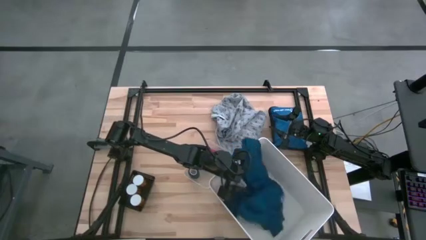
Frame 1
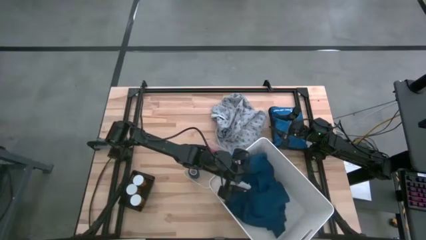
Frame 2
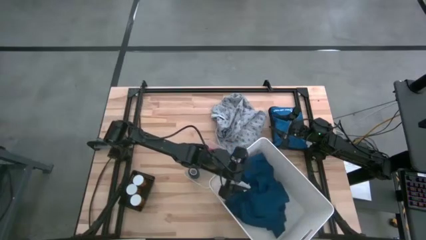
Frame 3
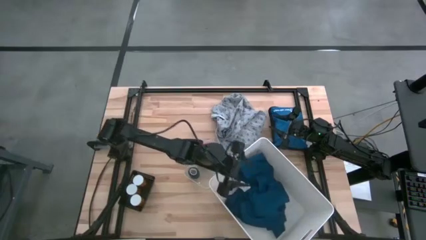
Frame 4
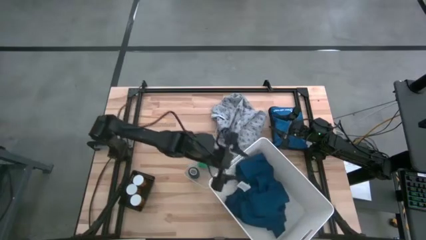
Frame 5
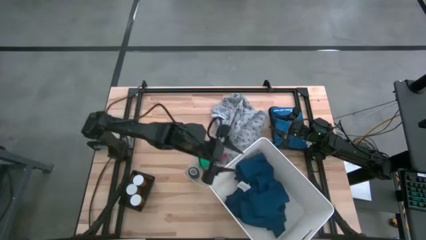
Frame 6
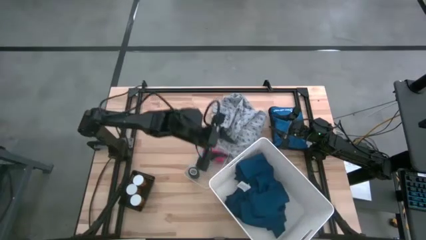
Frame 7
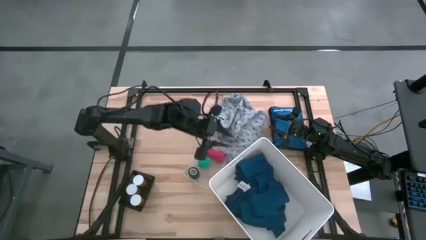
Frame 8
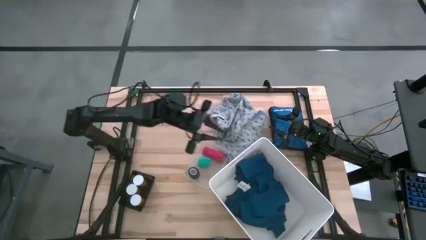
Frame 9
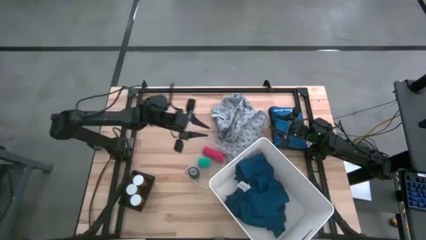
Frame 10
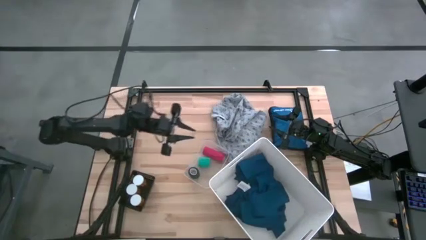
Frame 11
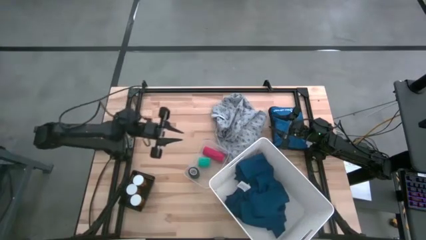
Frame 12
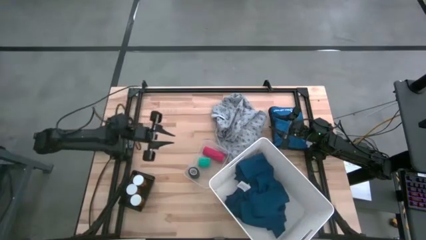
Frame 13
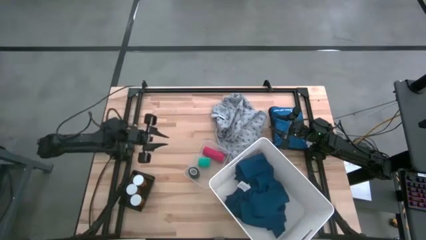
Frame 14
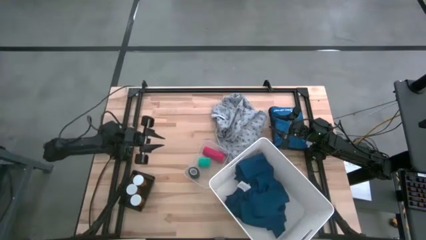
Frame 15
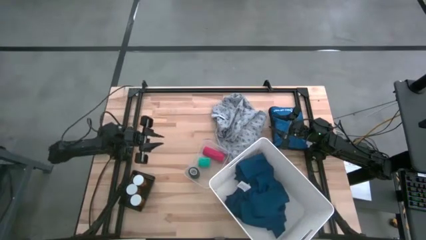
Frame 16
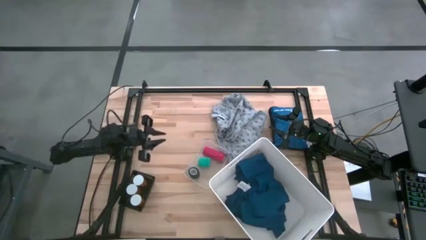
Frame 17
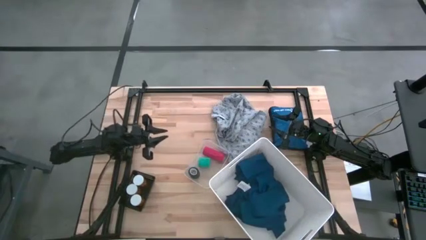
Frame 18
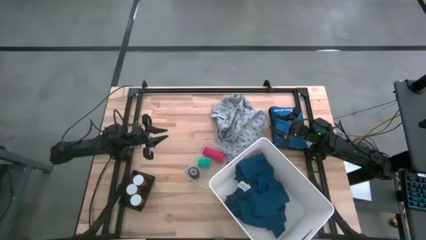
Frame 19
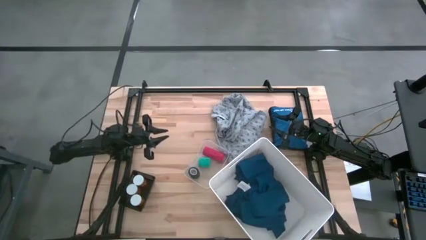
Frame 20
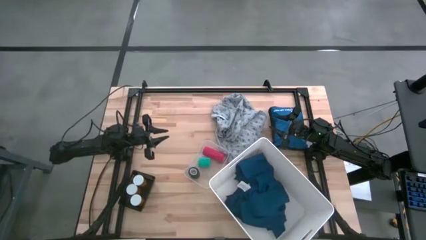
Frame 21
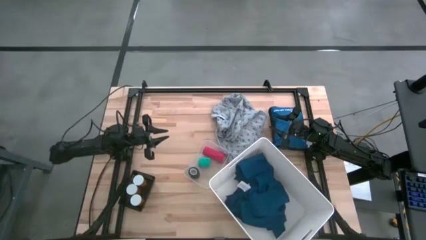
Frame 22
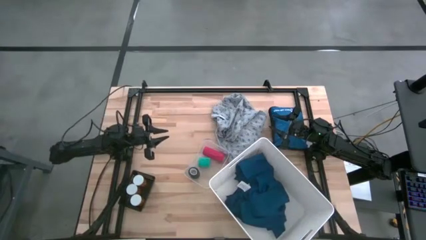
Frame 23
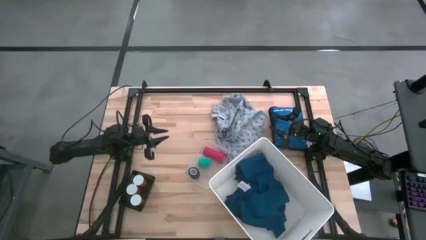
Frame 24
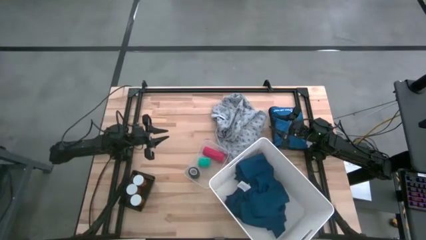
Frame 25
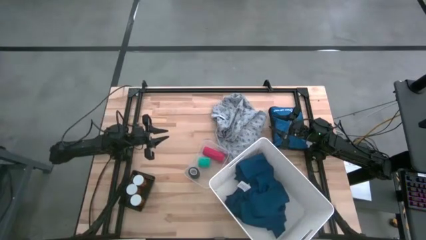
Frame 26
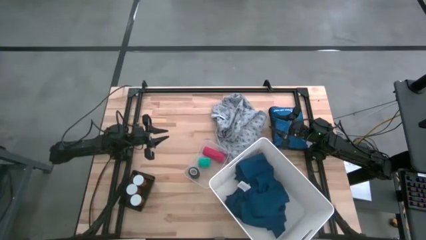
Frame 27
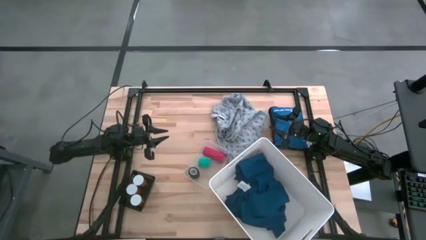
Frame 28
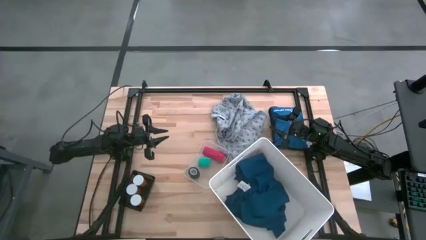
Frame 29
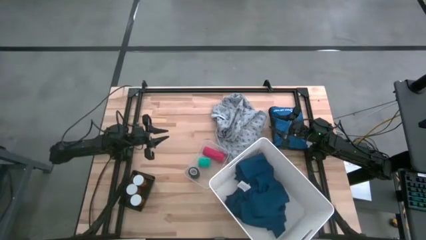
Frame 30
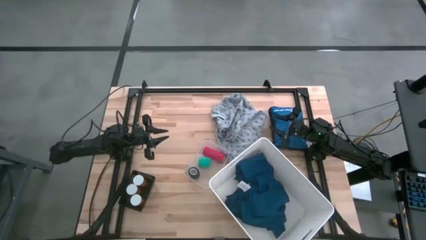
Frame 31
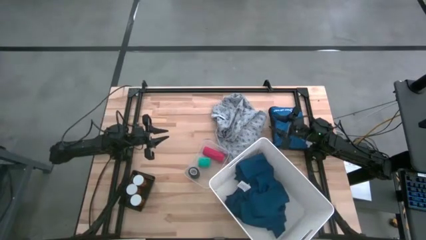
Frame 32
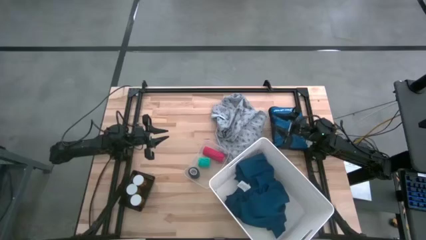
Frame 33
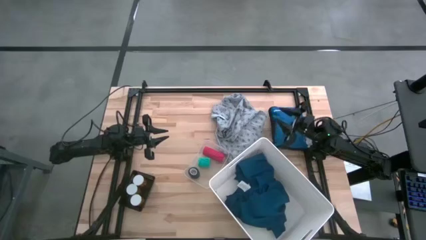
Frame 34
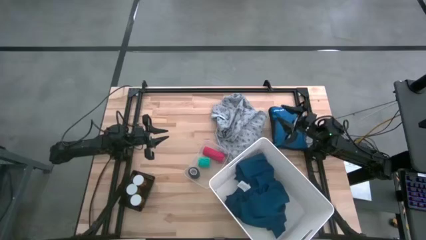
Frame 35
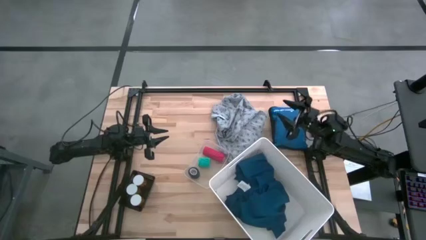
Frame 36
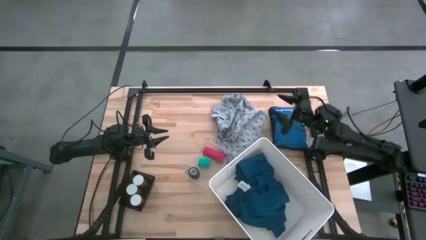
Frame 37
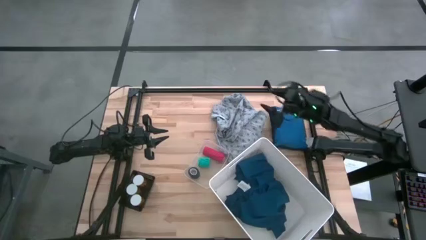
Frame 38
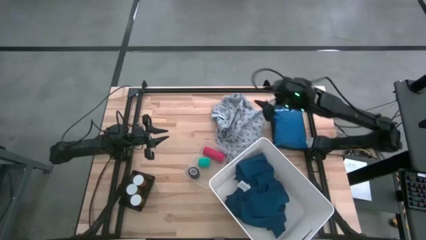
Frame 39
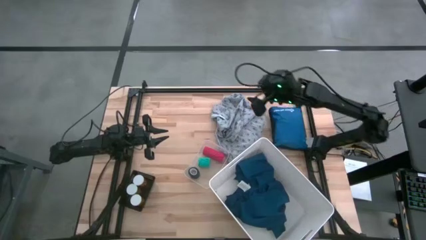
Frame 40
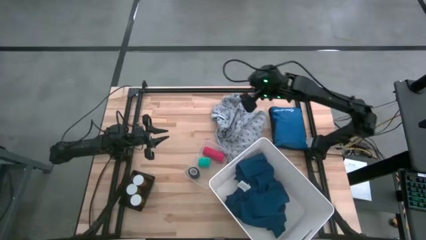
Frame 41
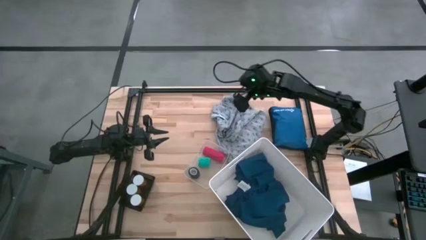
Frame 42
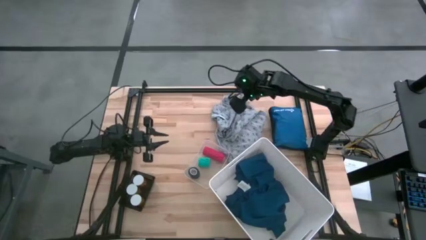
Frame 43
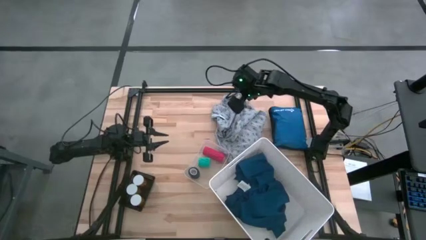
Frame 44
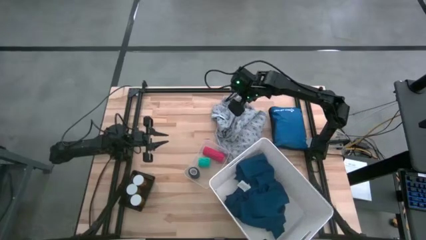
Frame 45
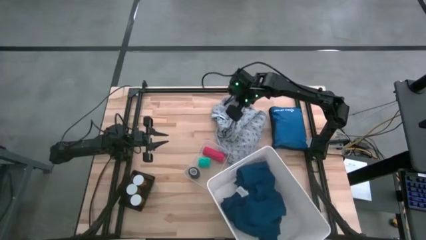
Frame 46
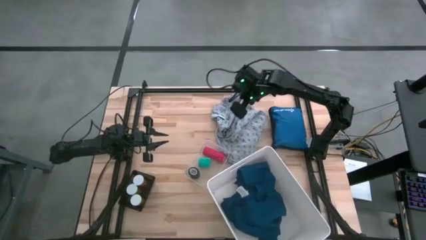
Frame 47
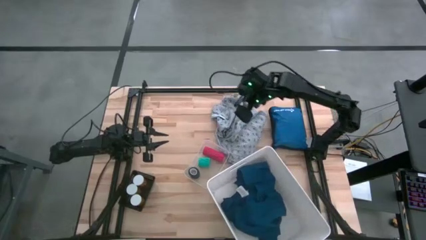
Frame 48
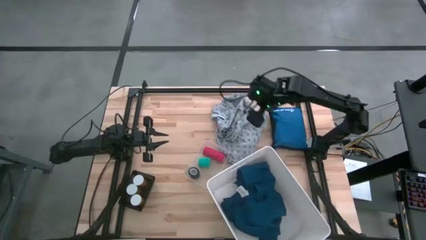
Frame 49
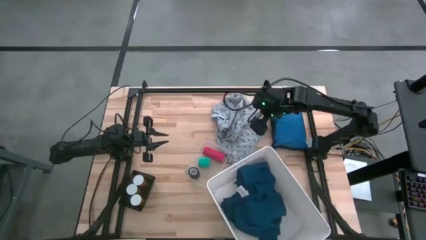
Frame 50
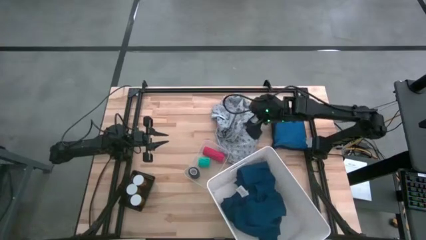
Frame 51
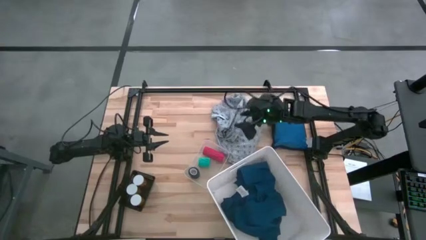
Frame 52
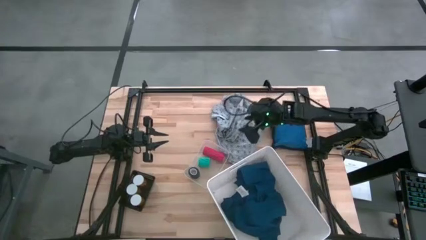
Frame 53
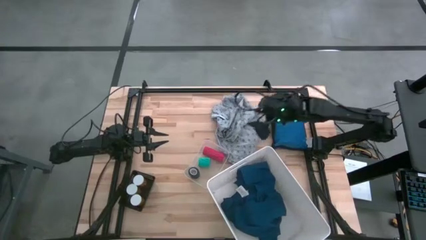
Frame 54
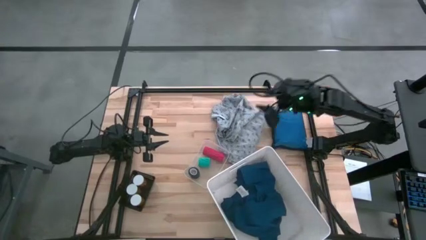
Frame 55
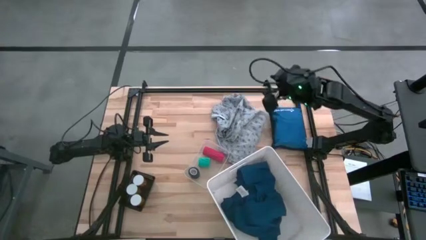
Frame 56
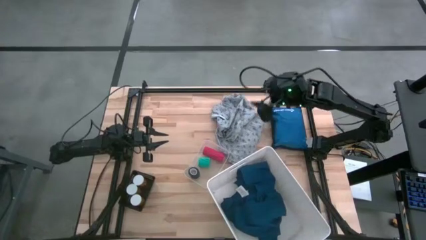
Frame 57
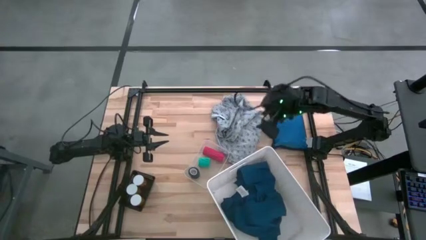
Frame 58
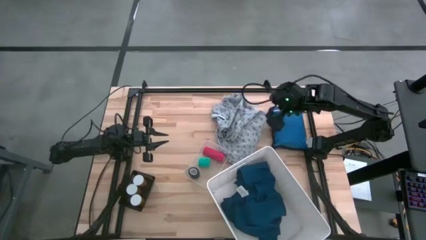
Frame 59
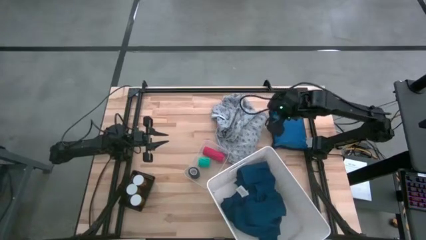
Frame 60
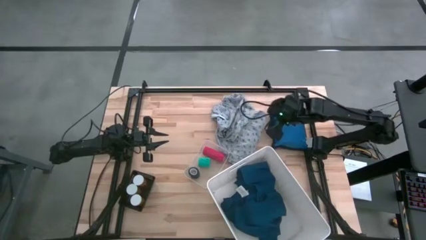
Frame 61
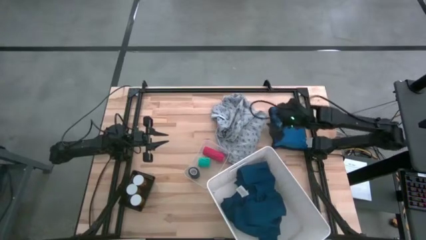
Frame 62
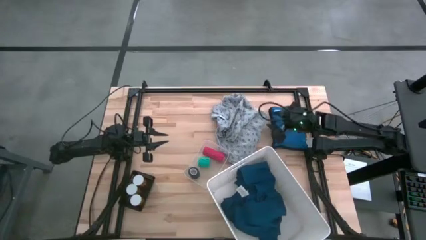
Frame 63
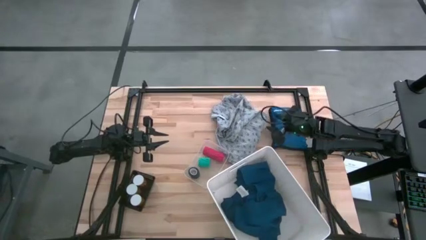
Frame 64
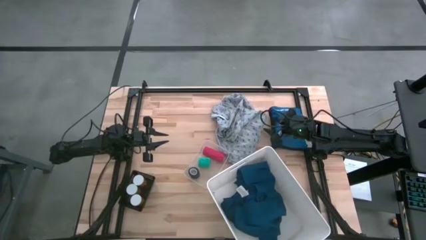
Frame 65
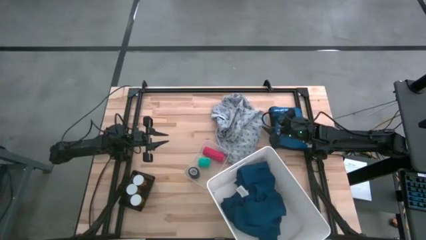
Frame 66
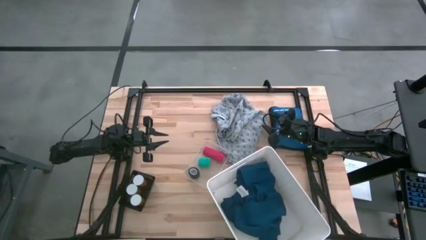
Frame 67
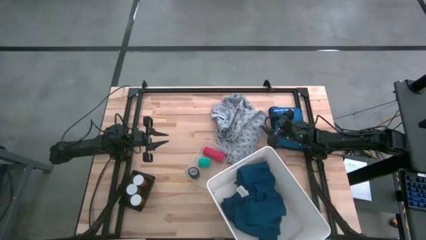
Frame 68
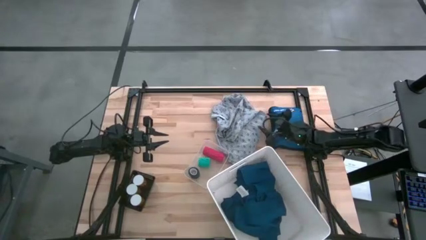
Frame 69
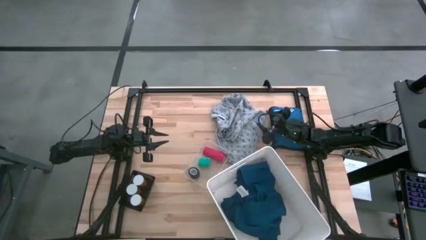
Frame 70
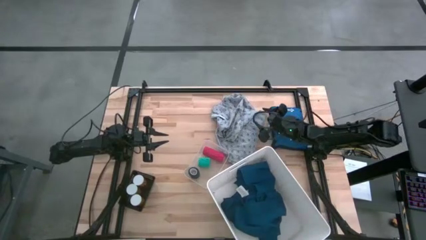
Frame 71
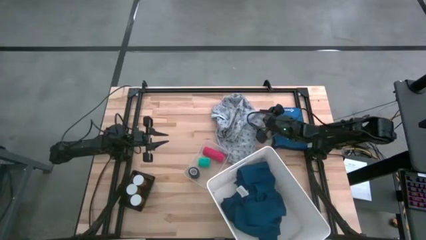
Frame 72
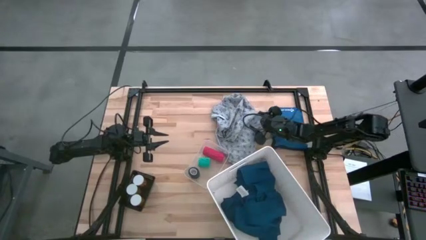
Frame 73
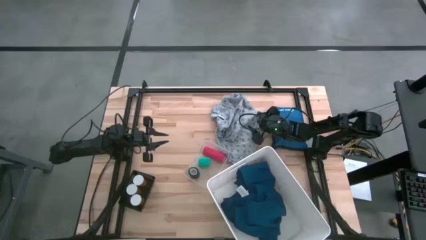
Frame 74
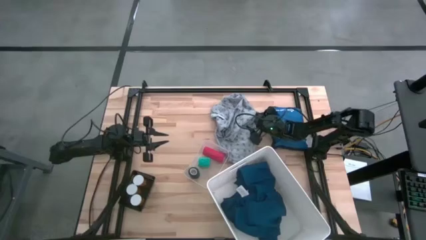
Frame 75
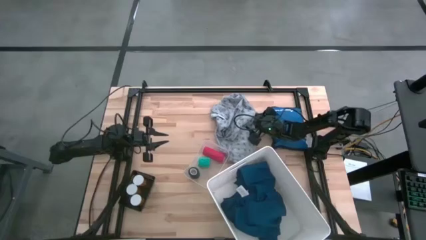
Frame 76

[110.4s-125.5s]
Task: Pick & Place Medicine items
Put the gray patient gown into the white bin

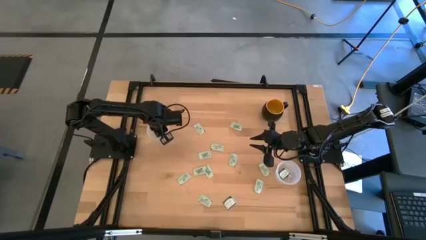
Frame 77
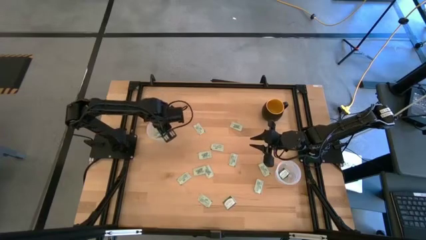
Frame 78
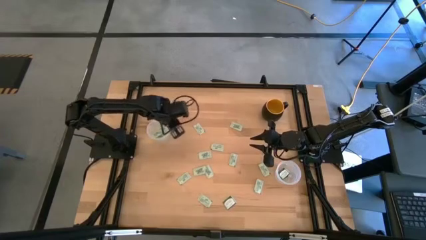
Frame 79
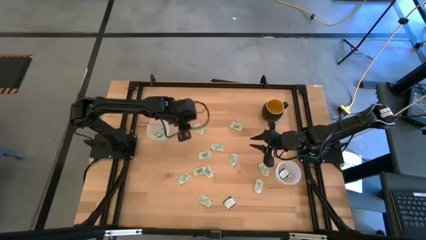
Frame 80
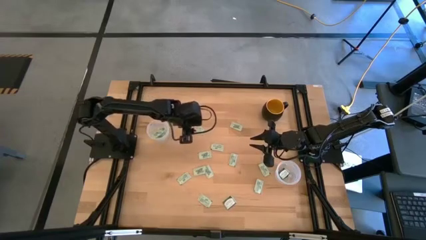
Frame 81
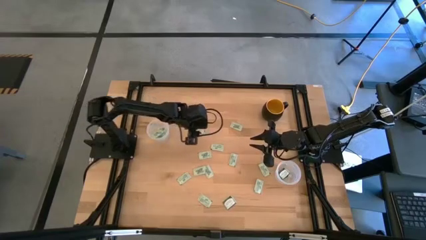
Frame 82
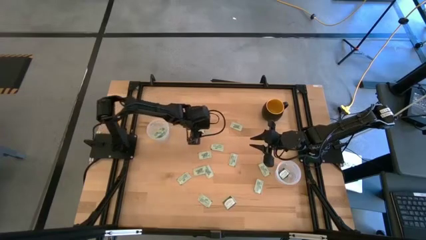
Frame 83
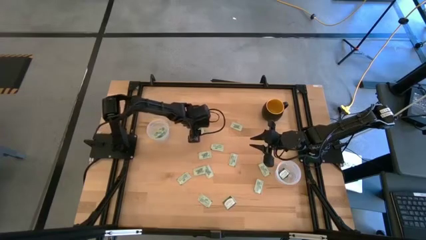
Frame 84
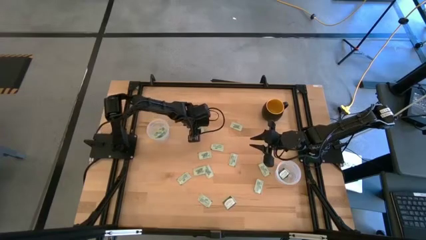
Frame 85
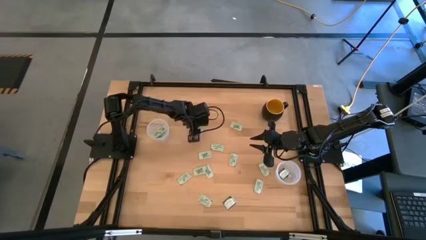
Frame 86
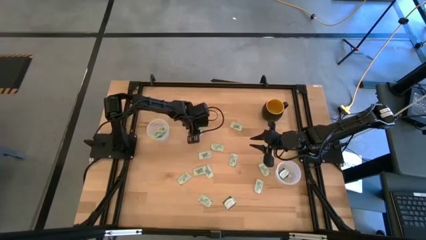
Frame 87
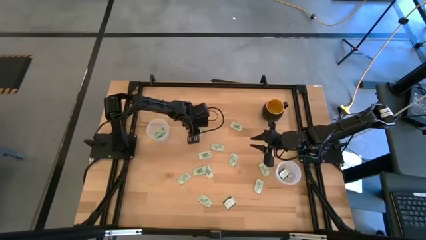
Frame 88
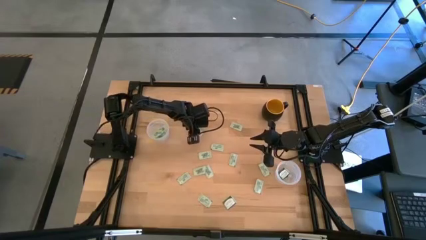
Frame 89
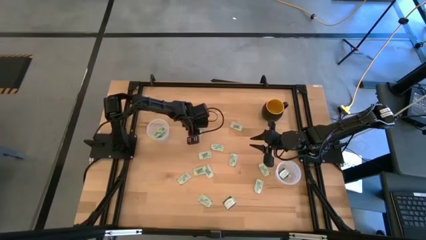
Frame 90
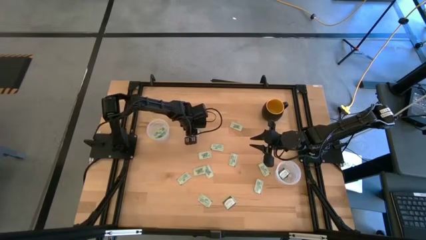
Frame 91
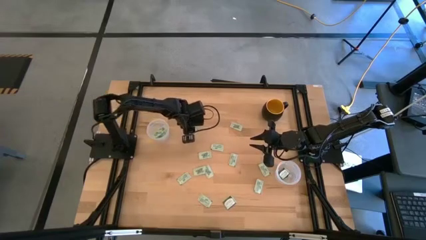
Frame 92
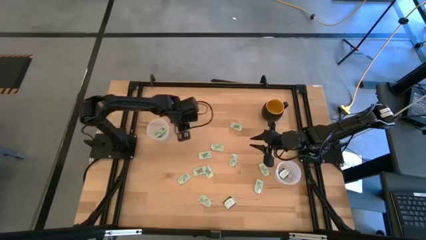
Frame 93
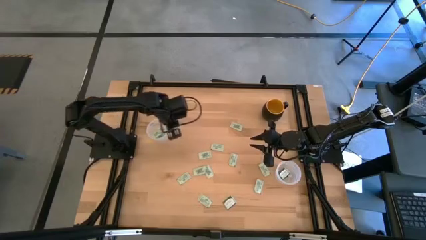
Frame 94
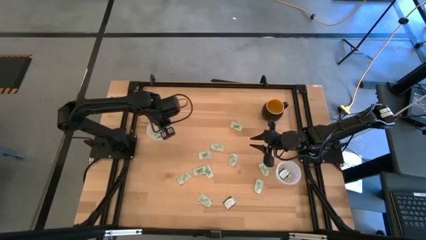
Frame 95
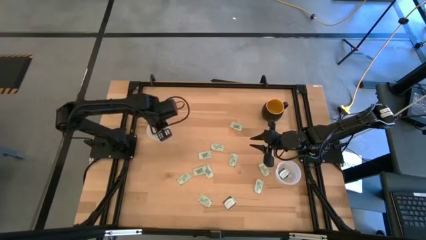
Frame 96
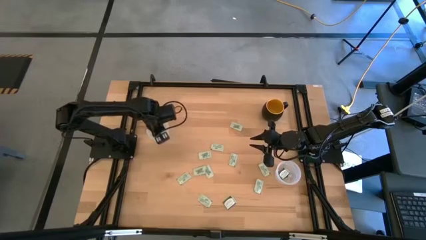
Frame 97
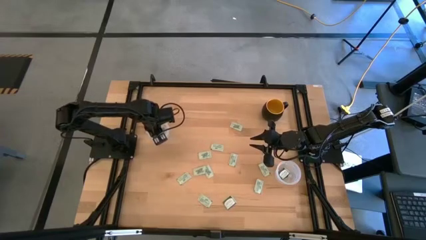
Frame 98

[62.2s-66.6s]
Task: Pick and place Stevia / Truvia into bins
Put the white stevia packet into the left transparent container
